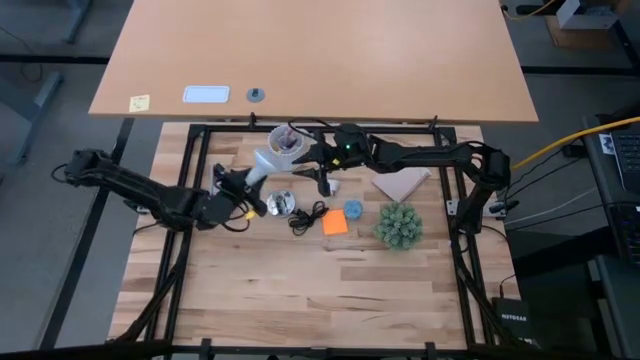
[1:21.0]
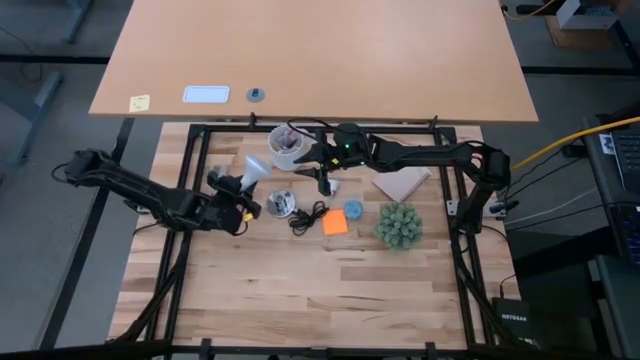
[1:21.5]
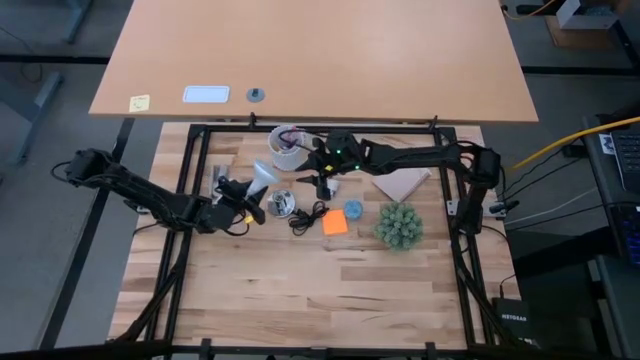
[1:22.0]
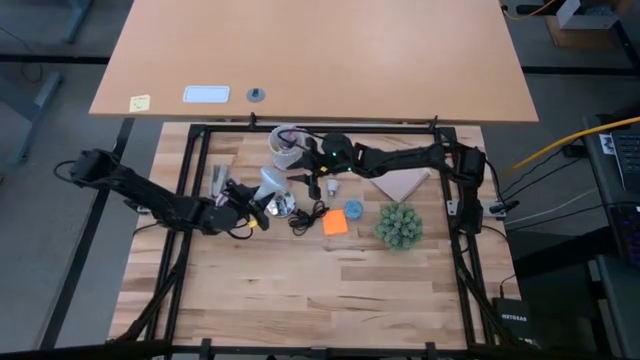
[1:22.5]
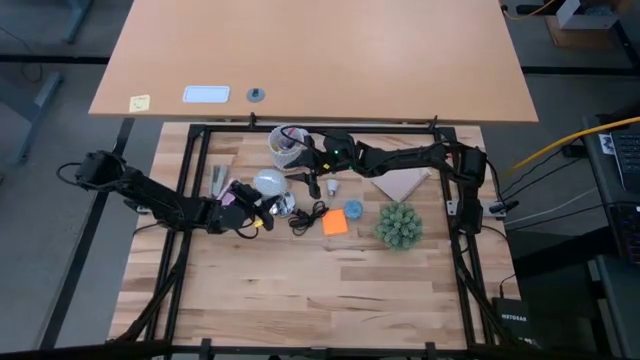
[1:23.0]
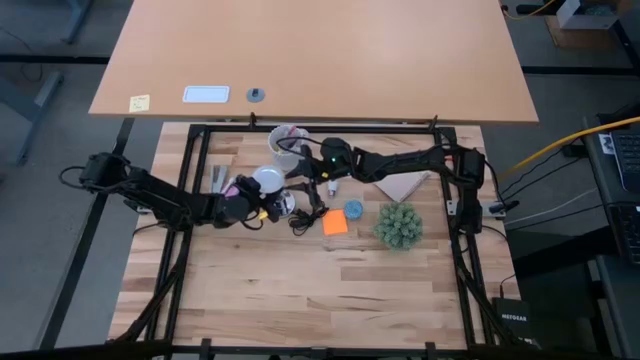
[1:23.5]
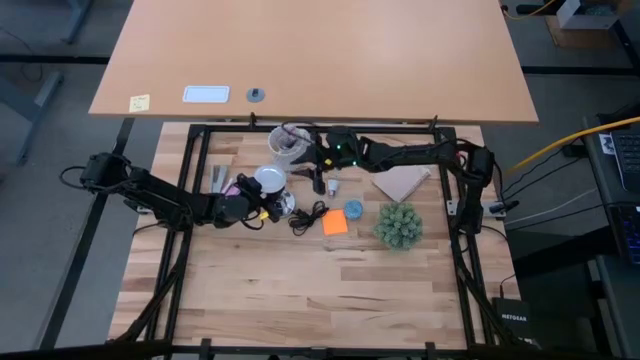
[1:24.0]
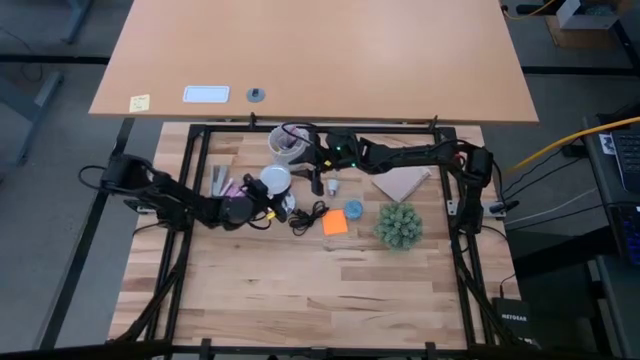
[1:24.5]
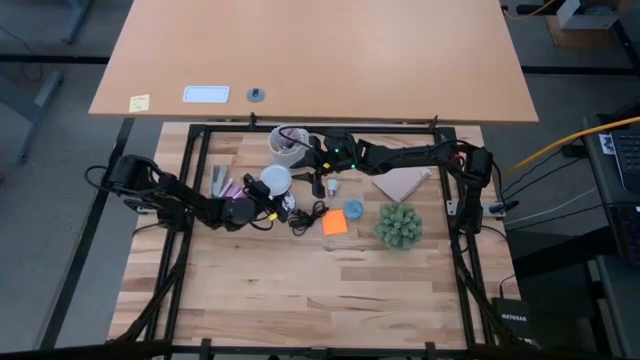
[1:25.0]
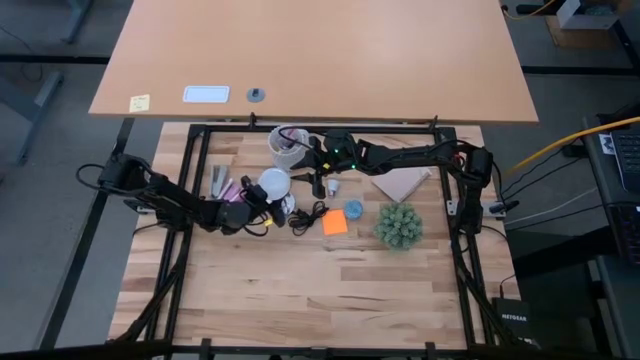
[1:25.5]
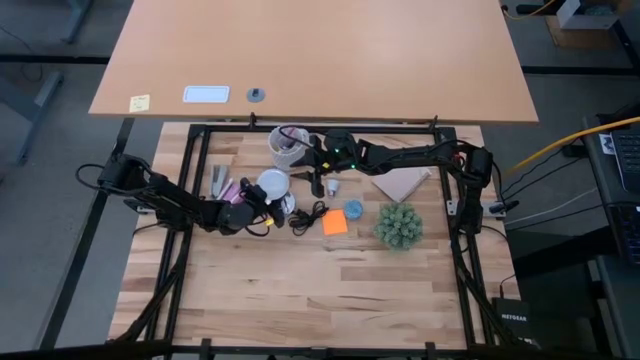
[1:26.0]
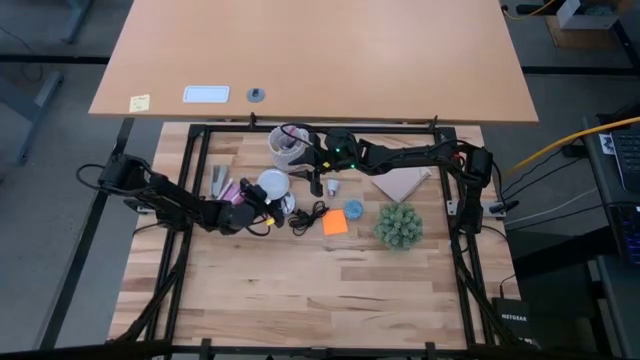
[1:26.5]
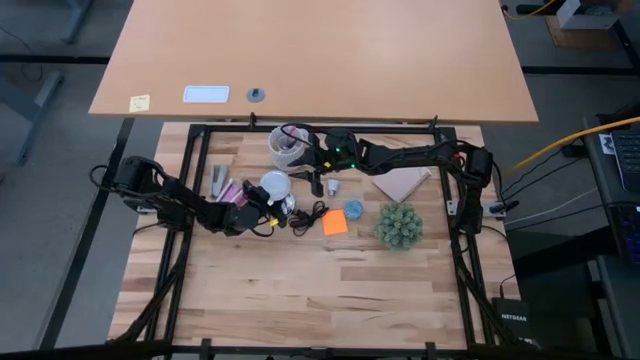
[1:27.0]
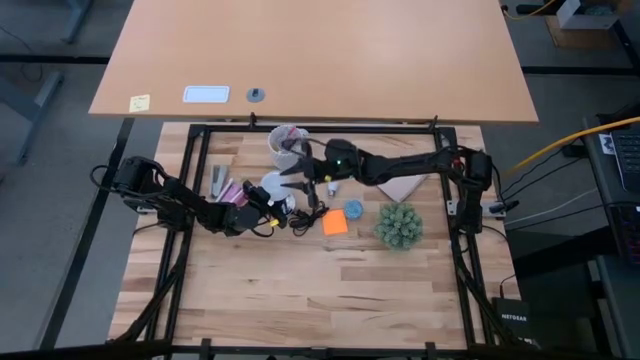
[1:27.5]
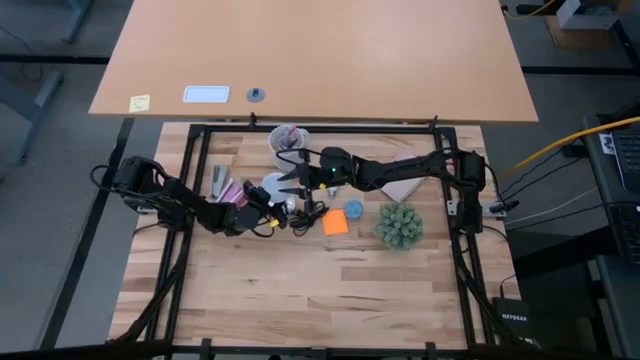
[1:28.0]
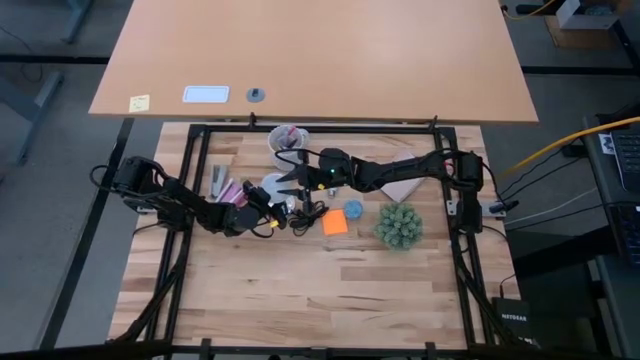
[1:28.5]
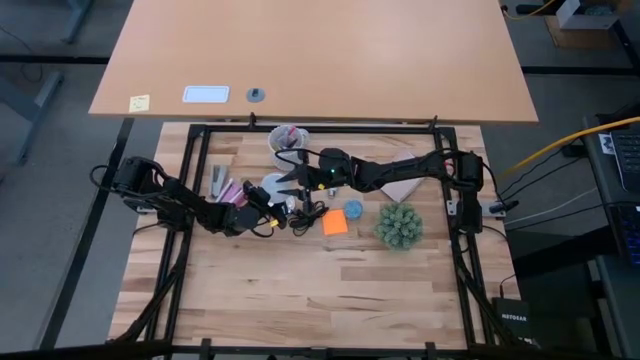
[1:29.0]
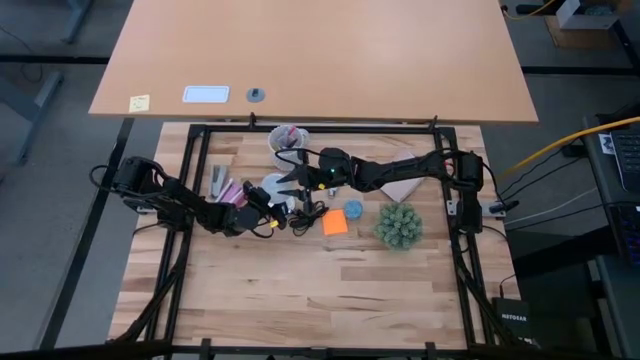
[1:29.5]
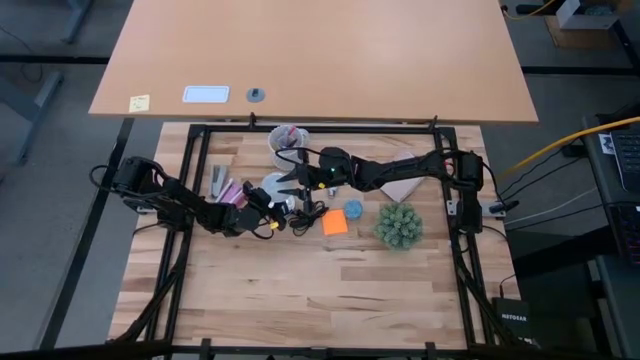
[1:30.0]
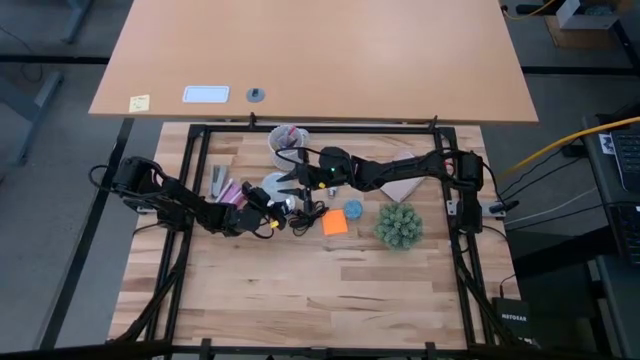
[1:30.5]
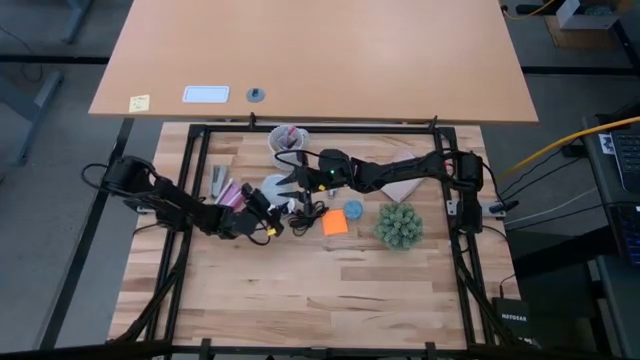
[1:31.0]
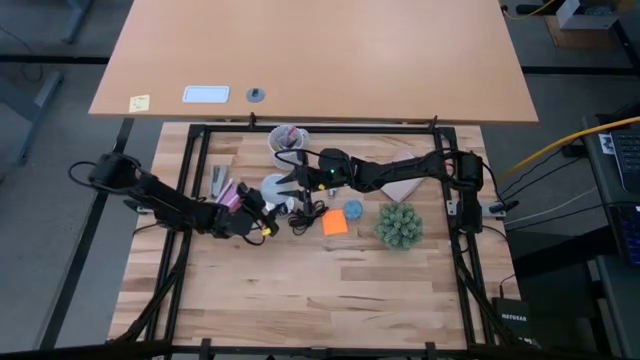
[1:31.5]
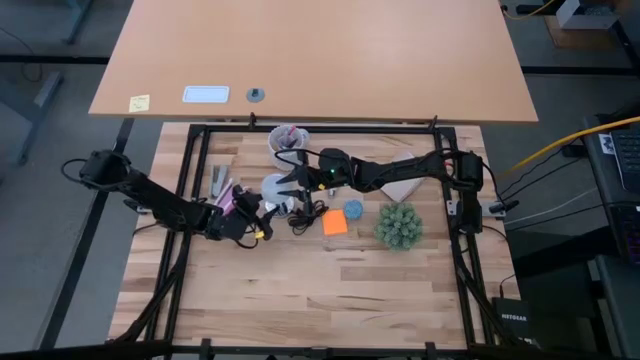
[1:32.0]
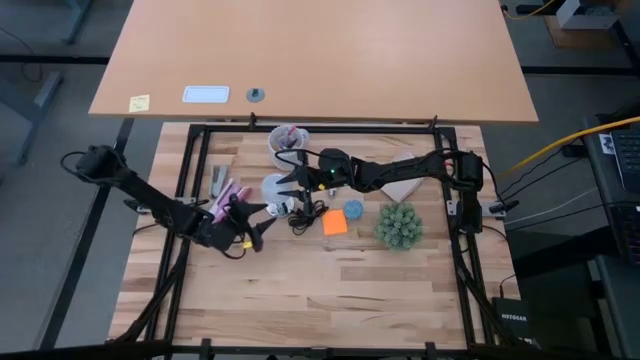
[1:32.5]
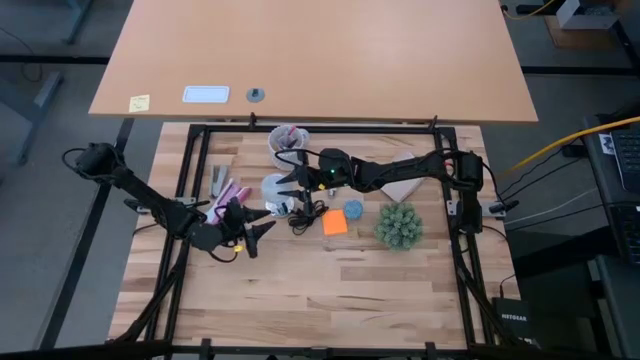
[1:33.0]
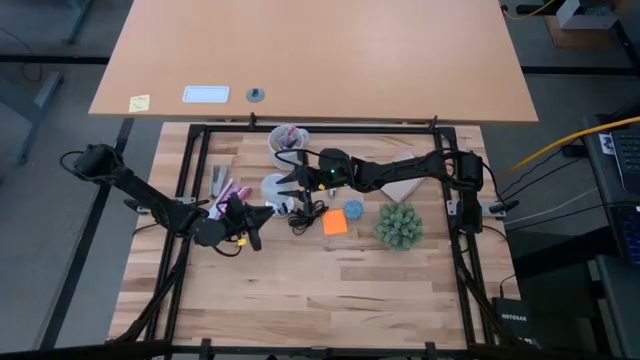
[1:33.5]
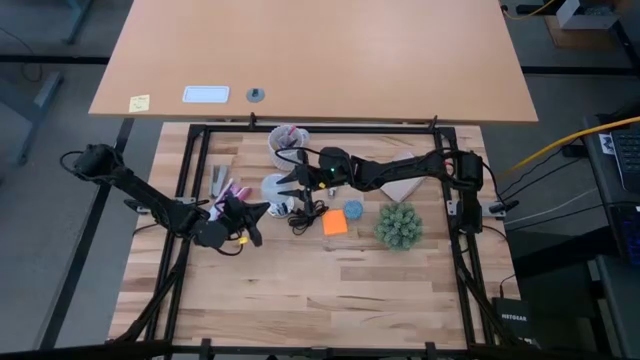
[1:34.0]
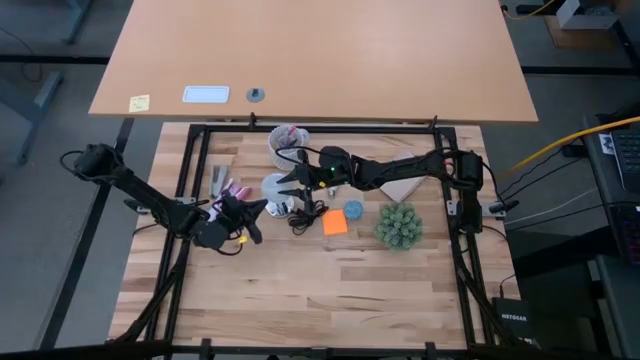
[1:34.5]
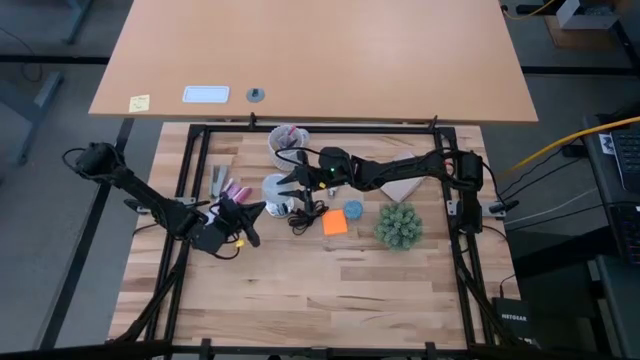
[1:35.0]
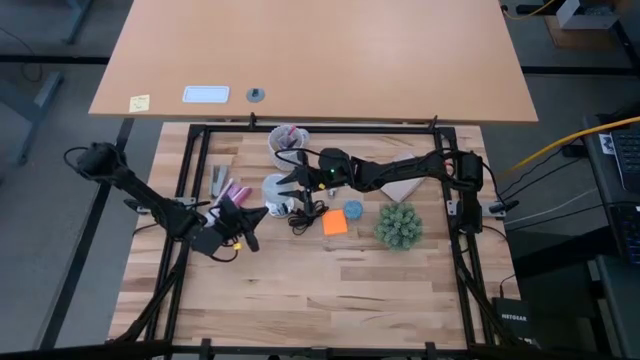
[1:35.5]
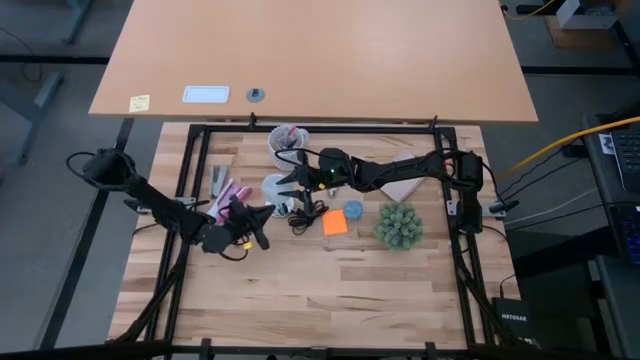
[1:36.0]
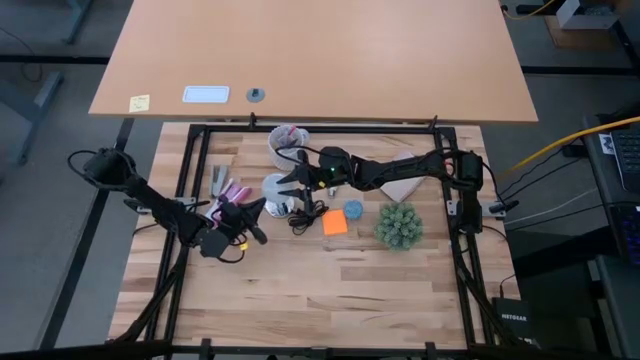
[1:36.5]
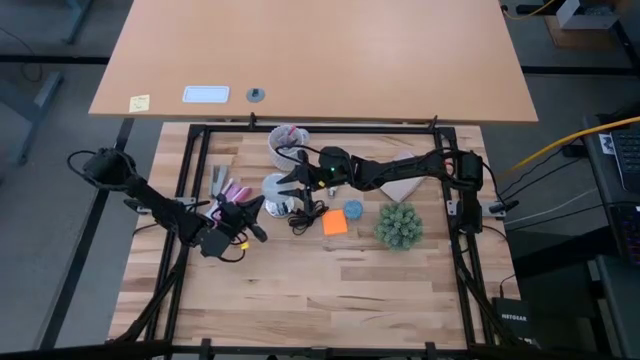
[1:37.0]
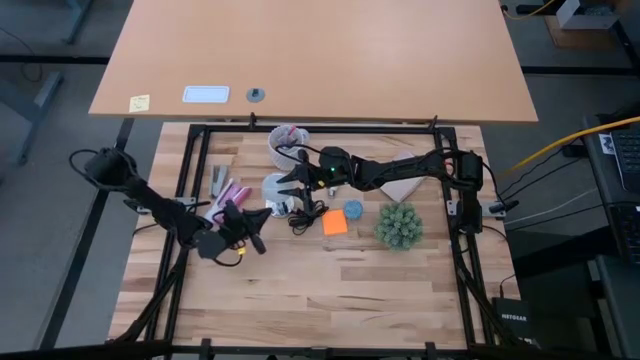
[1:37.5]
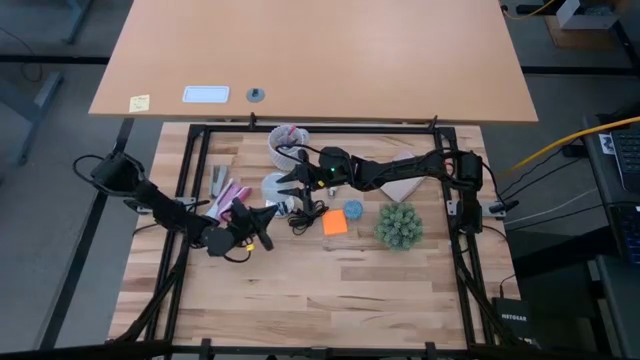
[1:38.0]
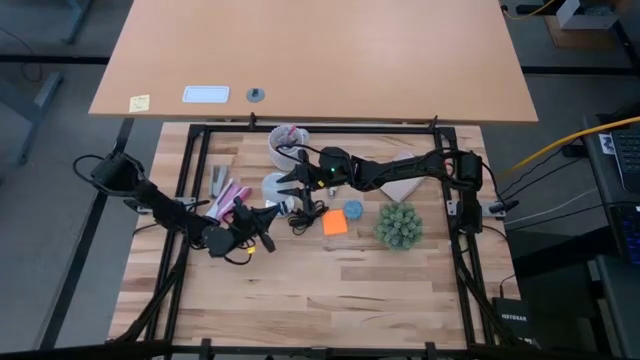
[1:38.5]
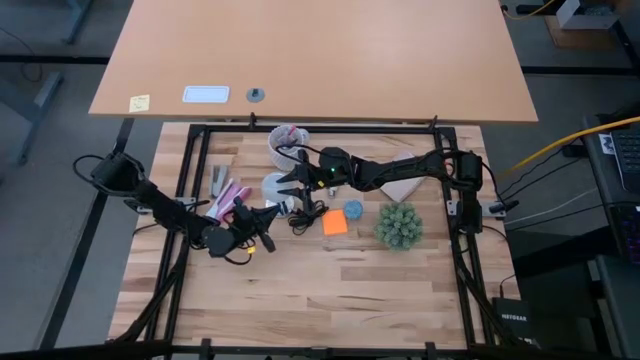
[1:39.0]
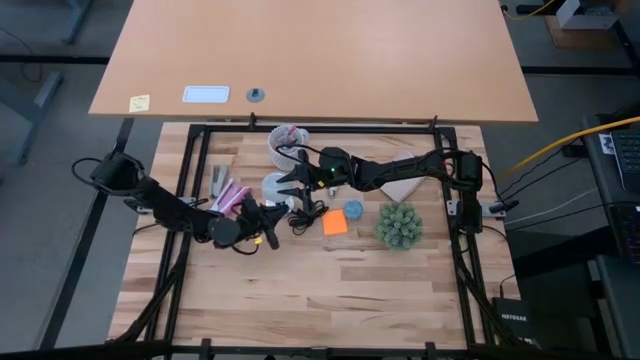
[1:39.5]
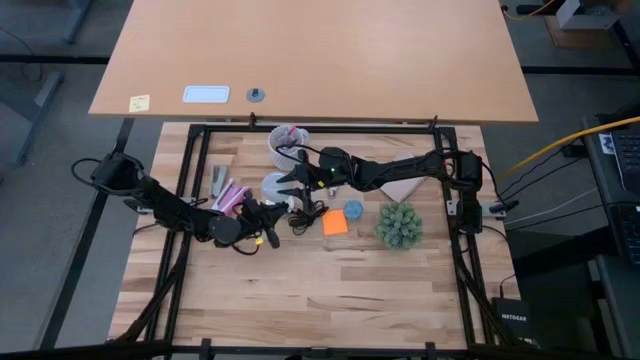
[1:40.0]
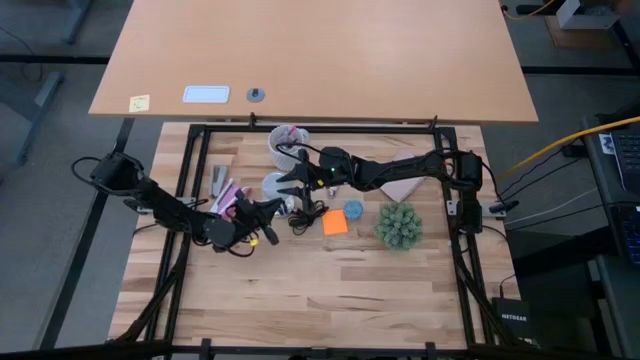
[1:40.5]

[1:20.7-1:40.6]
Task: Screw lightbulb
Insert the lightbulb into the silver lamp

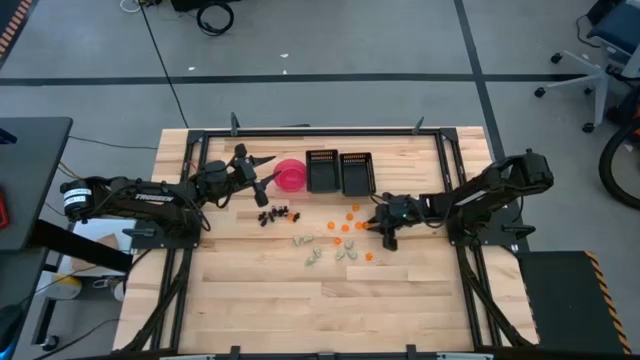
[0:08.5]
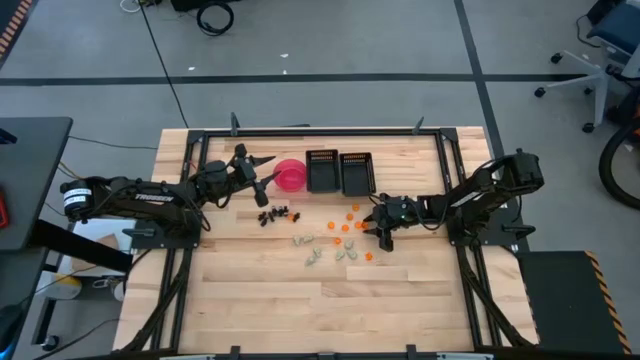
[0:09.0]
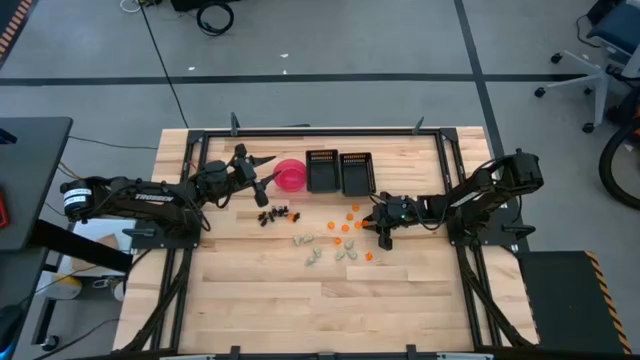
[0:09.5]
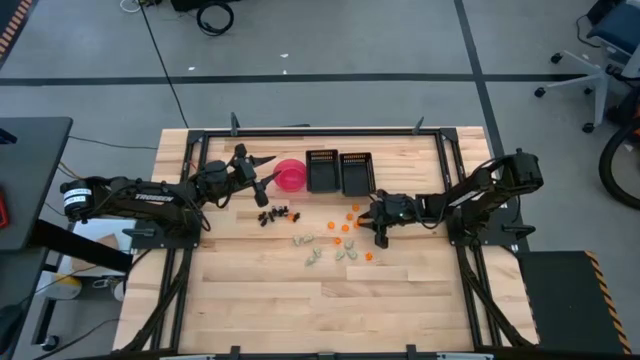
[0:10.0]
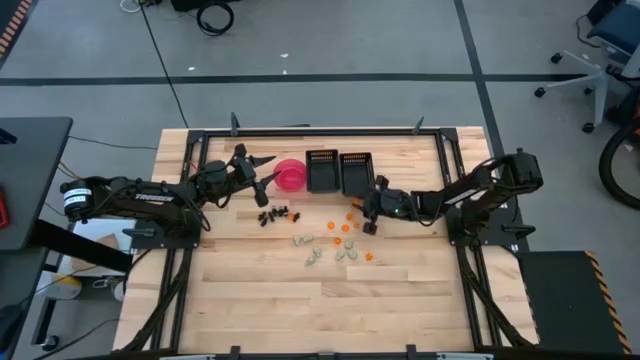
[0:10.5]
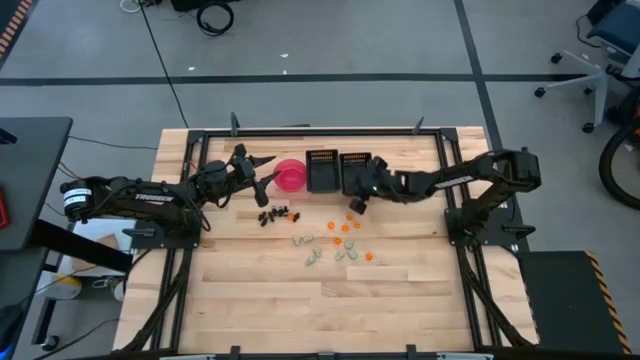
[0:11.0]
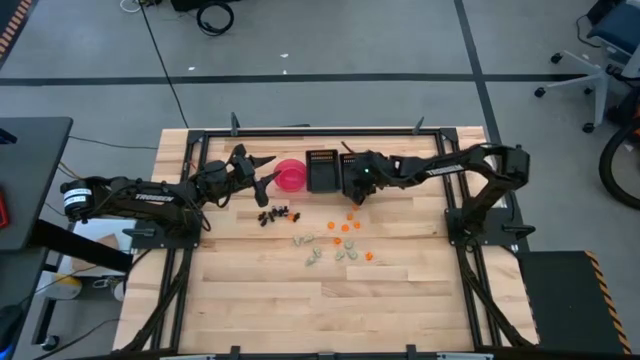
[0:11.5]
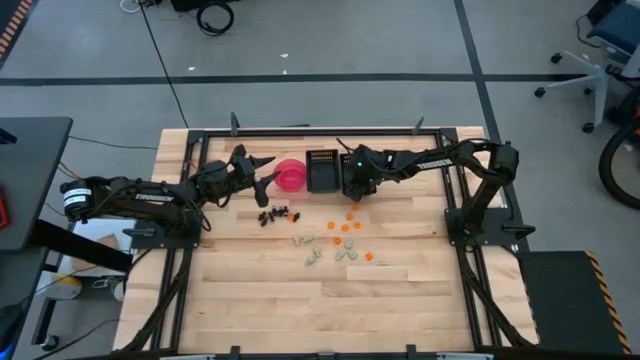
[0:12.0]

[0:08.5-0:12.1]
Task: Sort Halloween decoration
Put the orange pumpkin toy into the right black bin
